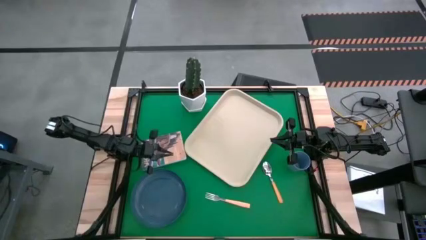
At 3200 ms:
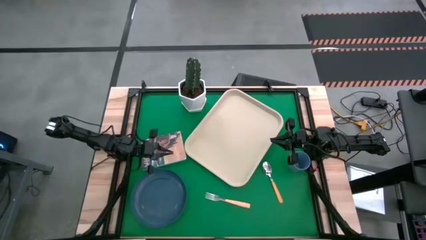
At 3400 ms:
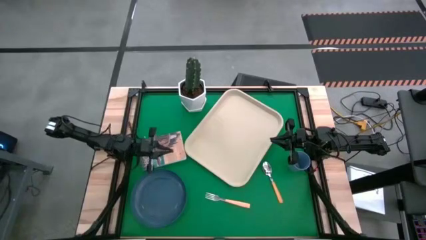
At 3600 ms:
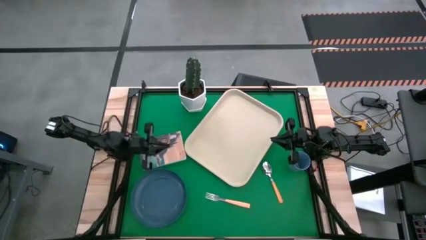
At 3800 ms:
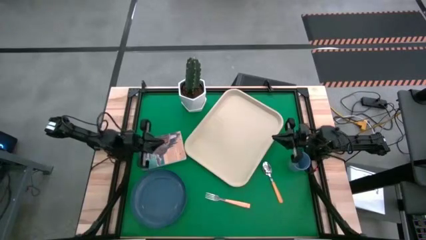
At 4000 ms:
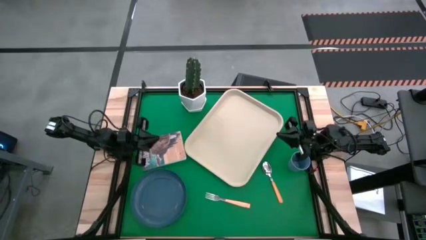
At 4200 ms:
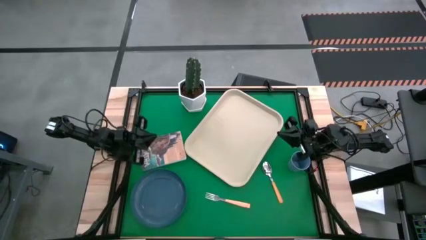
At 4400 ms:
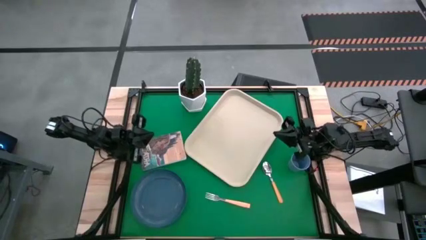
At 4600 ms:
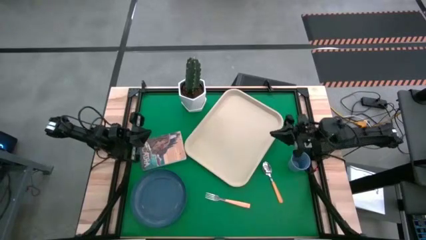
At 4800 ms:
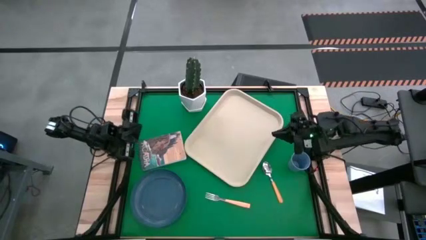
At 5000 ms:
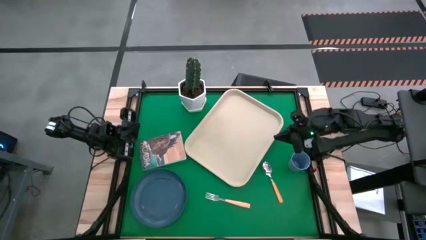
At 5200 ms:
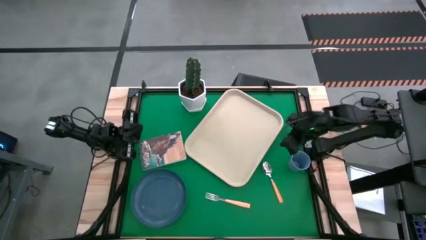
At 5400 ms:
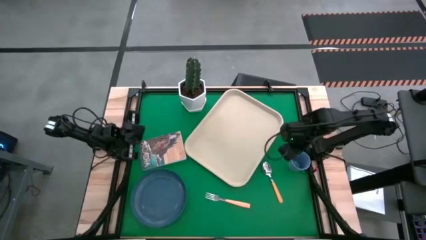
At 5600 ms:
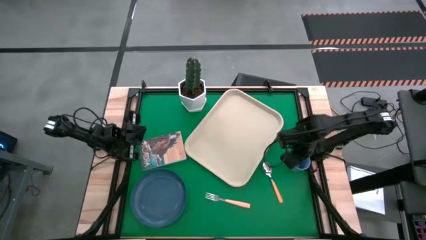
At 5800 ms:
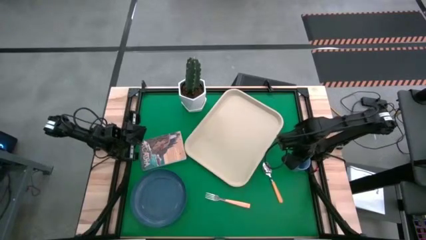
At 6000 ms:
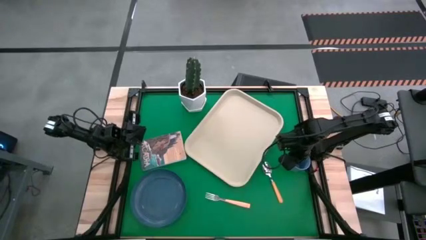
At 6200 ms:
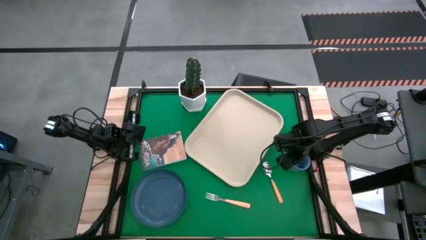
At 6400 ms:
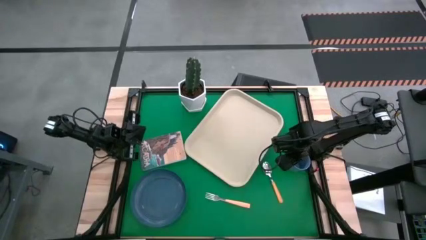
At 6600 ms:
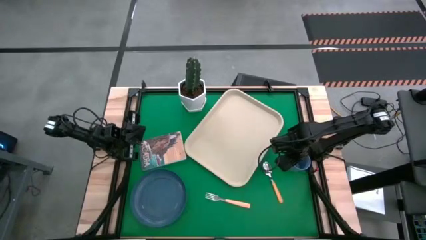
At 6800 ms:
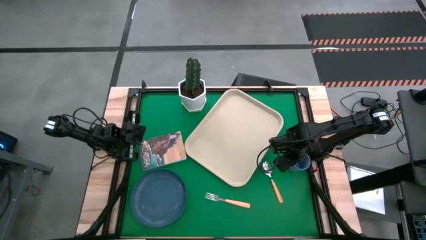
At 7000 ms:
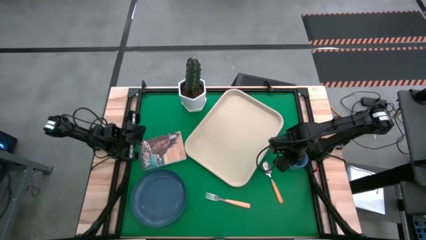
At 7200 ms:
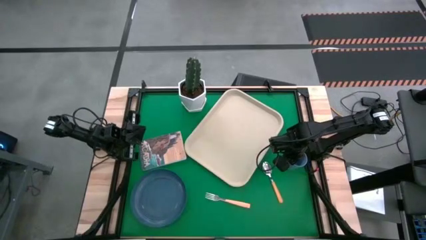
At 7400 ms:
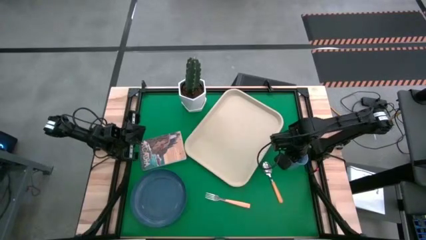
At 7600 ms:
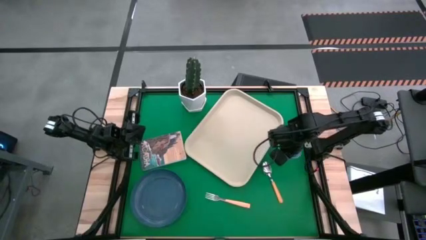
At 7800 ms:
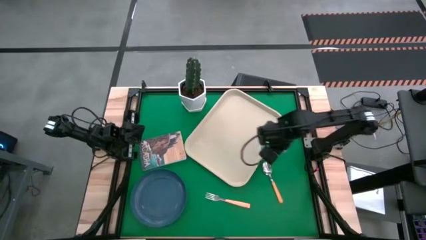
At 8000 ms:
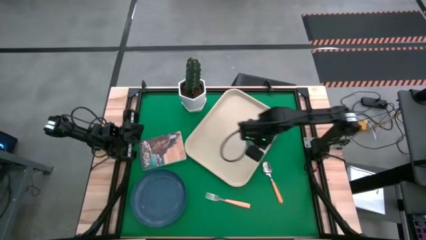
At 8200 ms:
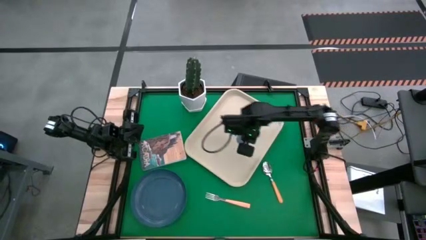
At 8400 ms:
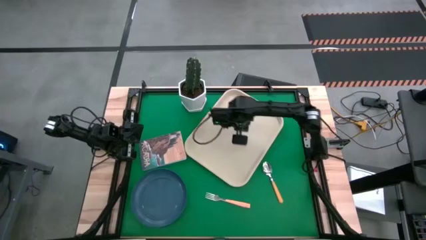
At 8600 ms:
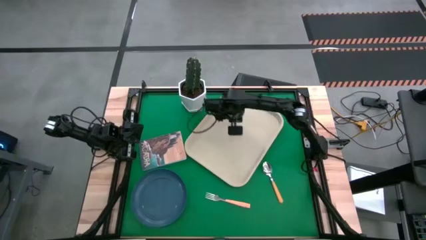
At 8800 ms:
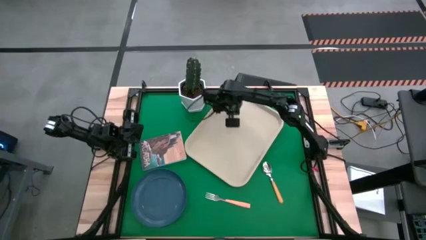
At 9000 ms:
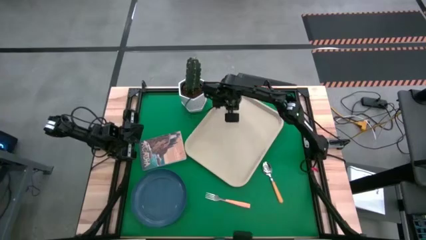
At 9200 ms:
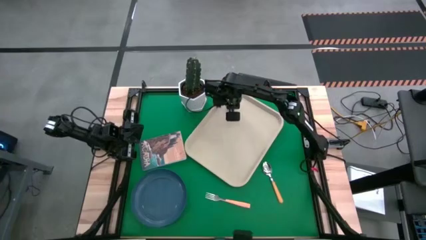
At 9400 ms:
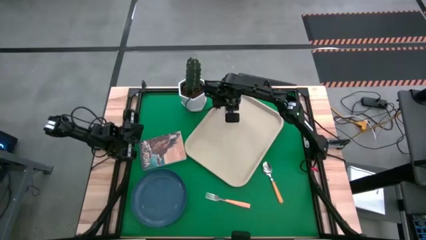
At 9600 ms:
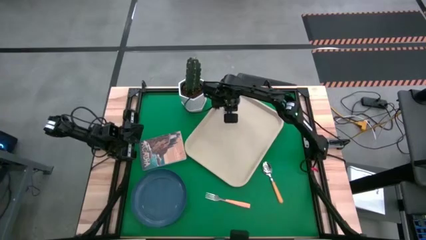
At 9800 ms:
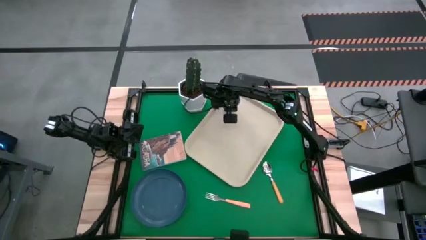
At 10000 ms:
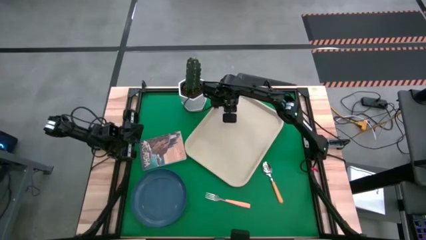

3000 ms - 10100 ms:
Task: Pick and place plate/cup/fork/spoon on tray
Put the blue cup in the white tray

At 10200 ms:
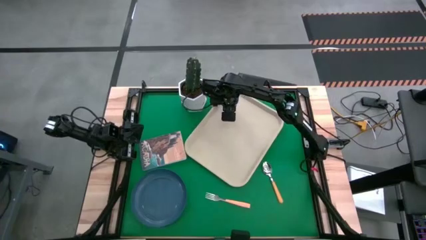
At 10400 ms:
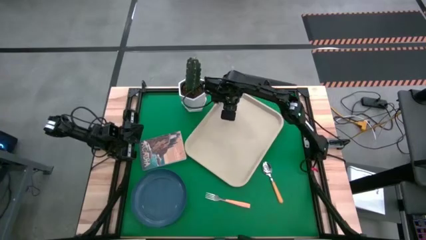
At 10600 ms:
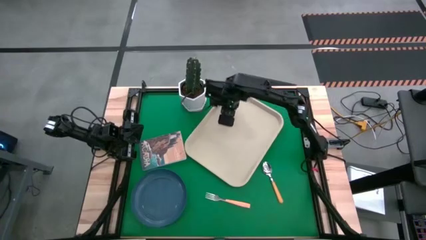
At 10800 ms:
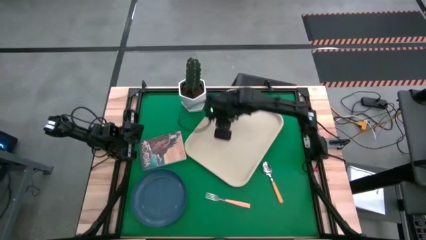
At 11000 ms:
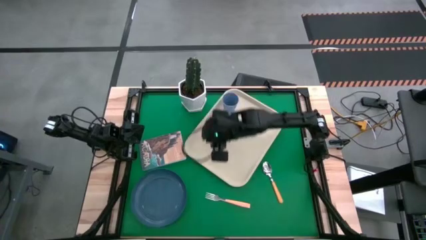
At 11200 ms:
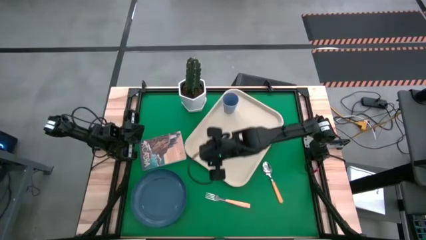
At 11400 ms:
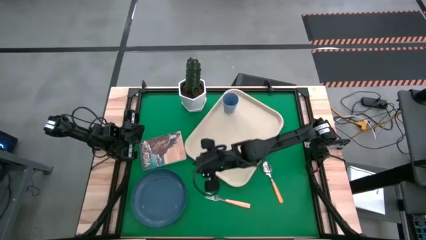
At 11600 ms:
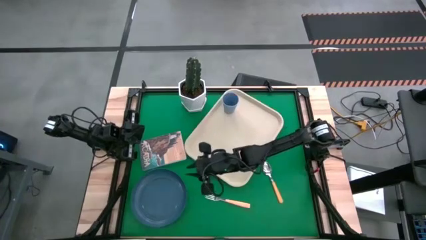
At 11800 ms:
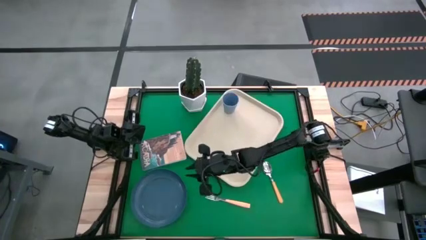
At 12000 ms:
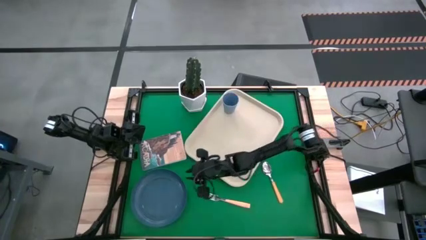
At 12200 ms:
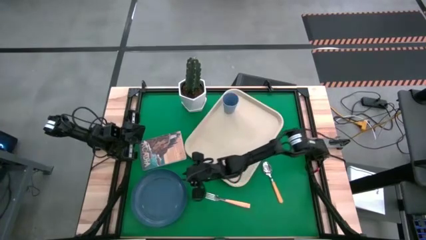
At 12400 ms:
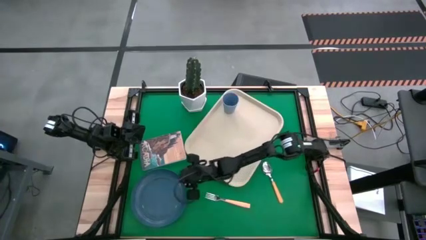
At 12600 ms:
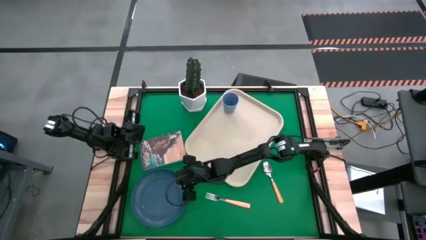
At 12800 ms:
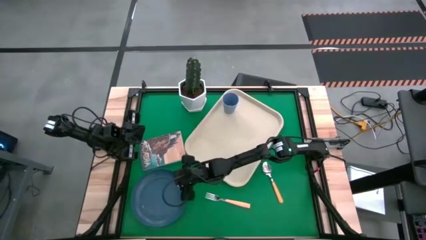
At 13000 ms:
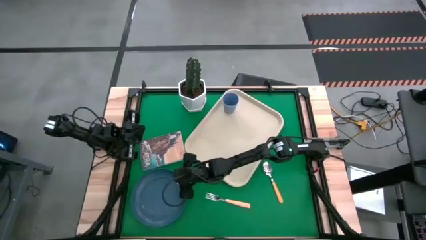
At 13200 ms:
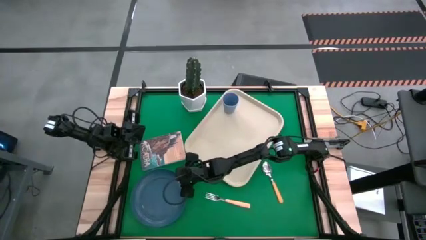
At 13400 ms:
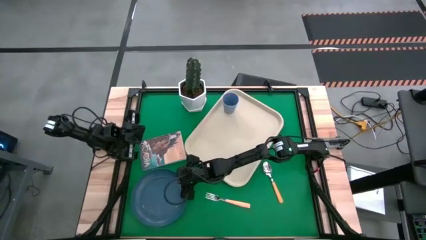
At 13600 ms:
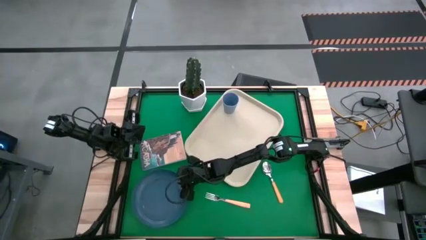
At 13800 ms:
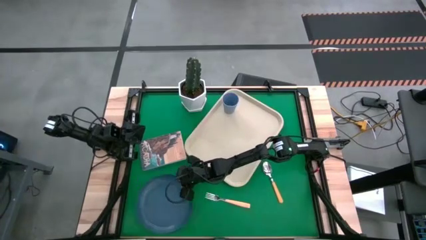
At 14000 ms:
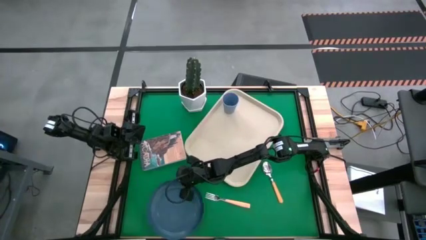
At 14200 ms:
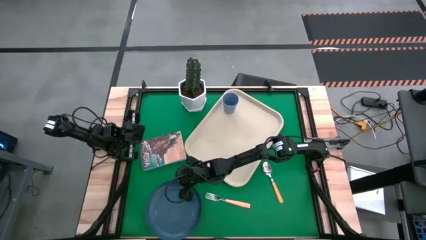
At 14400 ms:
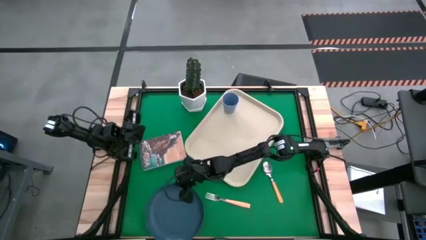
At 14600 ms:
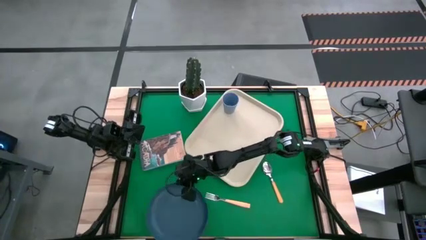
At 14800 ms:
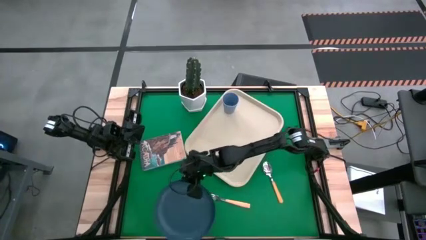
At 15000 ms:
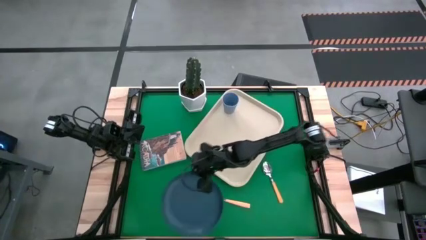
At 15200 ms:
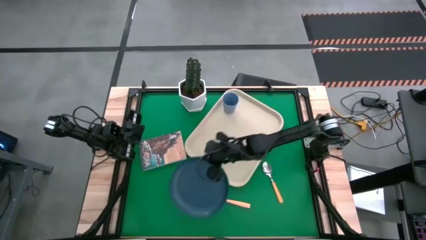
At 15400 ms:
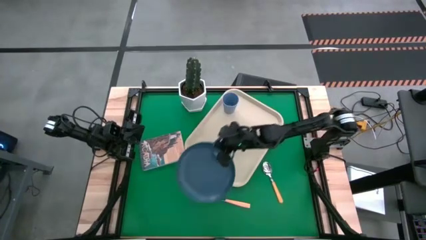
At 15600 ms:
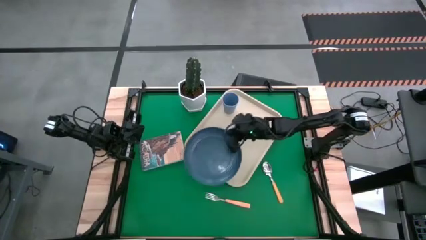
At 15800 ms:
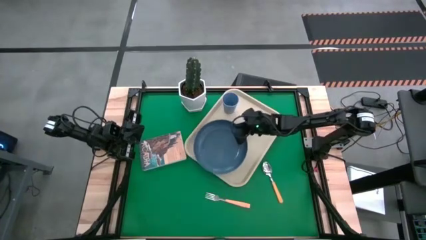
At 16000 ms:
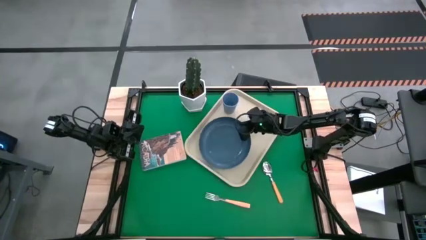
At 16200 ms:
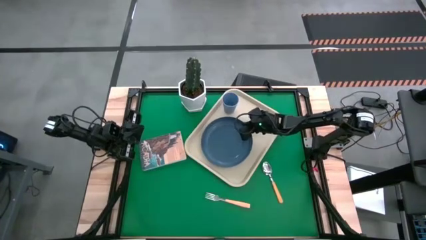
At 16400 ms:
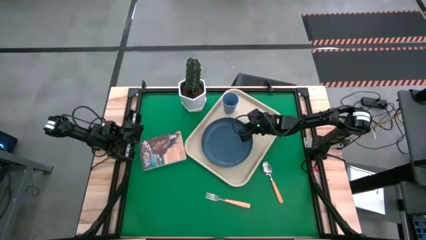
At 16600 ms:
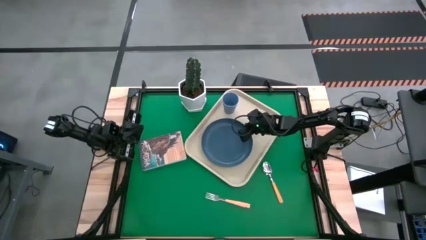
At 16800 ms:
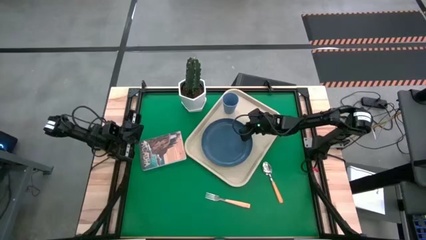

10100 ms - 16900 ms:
Put the dark blue plate in the white tray

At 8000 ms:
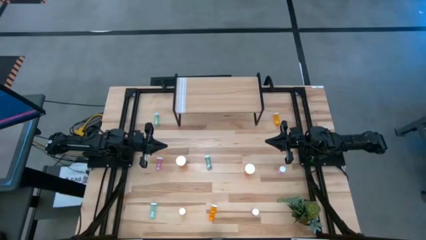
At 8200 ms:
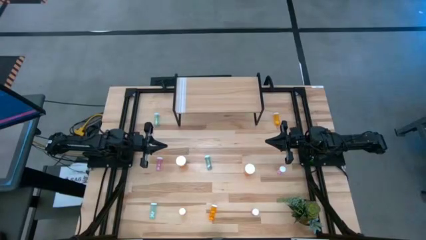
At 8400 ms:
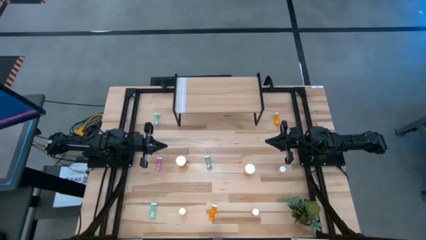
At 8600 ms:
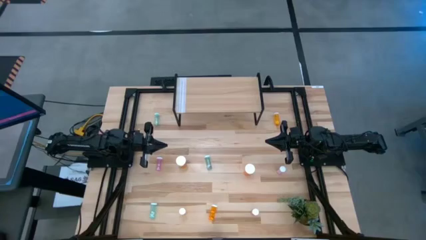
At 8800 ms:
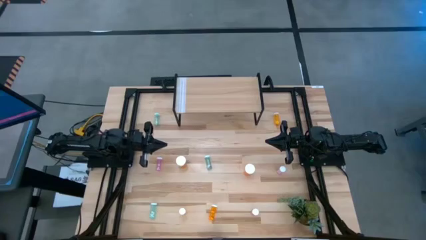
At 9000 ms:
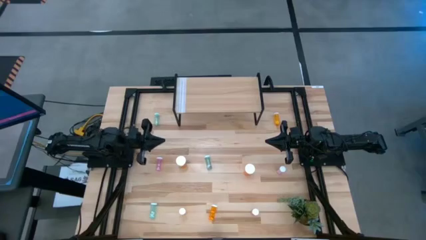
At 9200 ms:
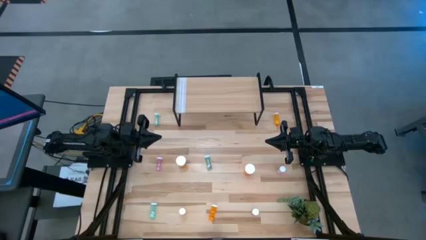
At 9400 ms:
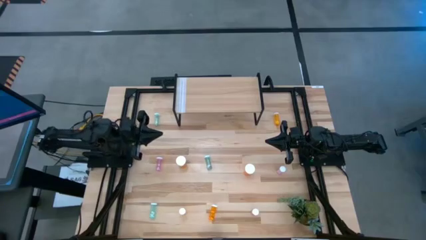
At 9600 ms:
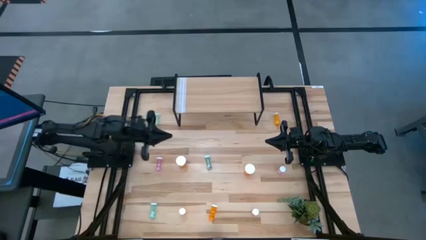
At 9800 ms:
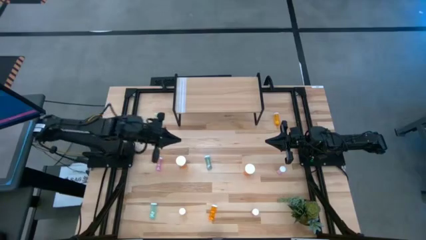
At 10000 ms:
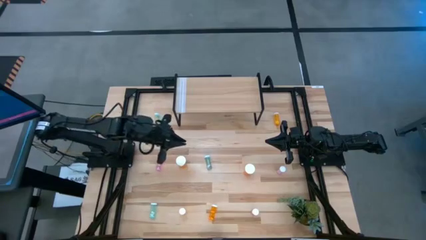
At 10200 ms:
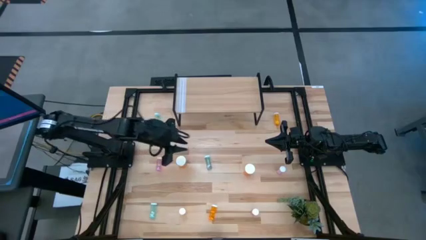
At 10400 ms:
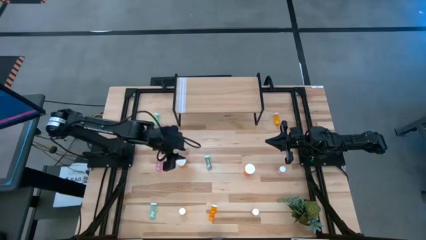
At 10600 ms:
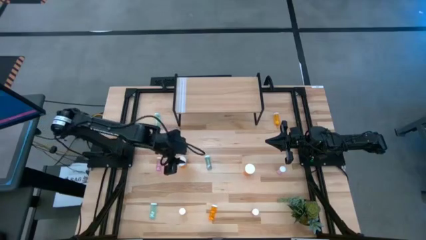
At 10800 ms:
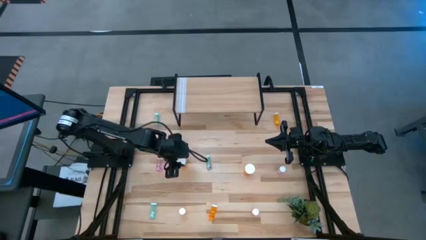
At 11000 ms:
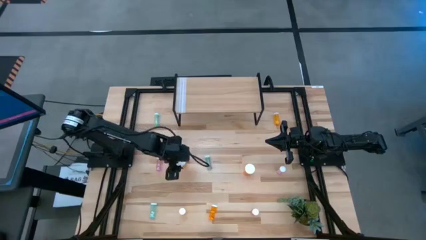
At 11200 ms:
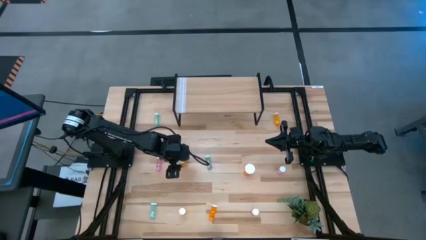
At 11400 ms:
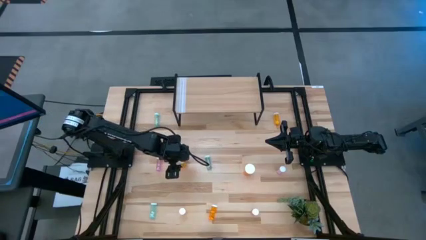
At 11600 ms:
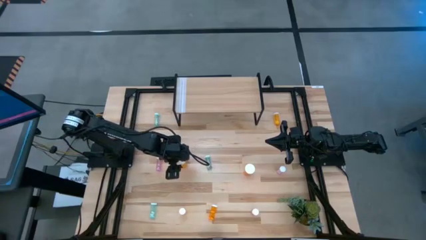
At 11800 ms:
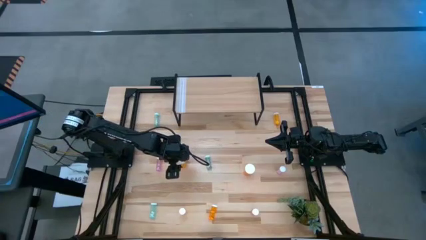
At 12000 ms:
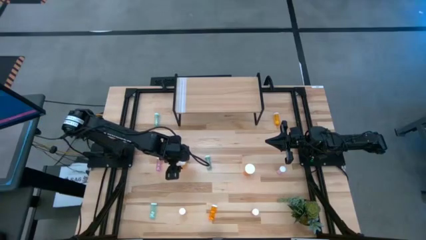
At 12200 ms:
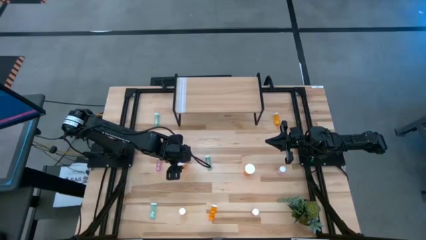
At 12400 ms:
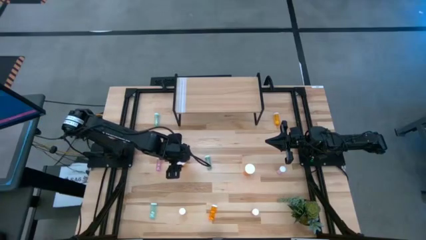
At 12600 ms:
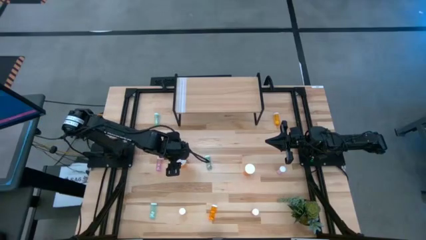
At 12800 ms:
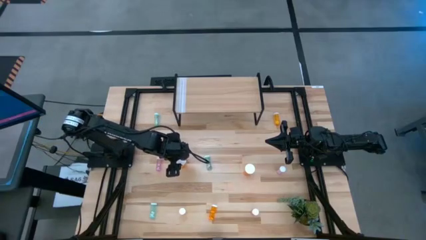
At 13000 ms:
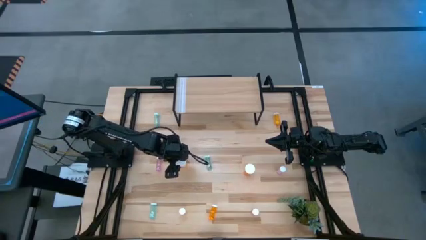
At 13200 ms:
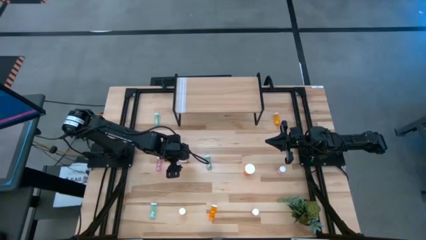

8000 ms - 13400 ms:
Task: Pick and place medicine bottles onto shelf by color
Put the left large orange pill bottle on the shelf
